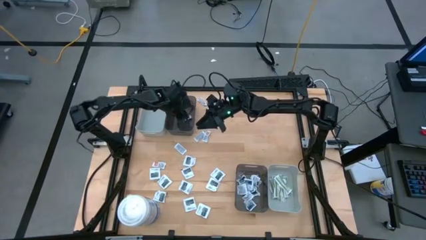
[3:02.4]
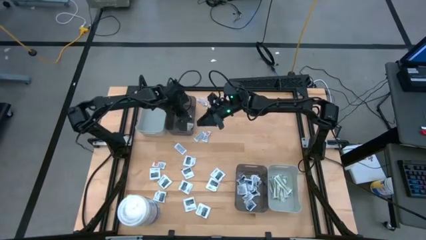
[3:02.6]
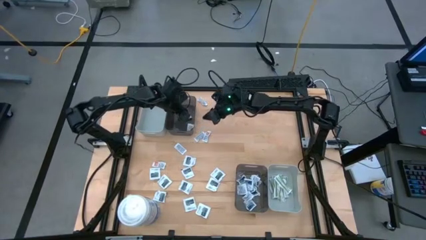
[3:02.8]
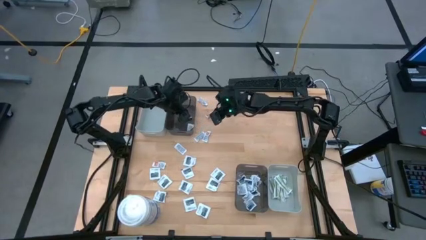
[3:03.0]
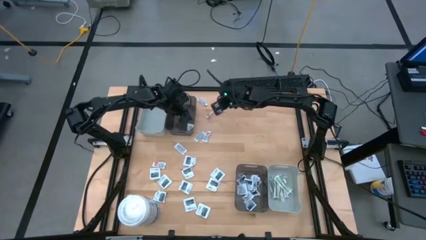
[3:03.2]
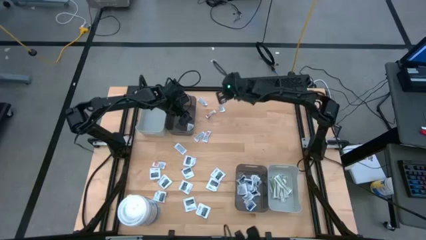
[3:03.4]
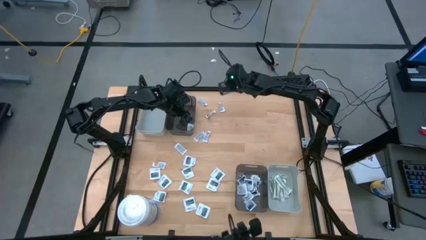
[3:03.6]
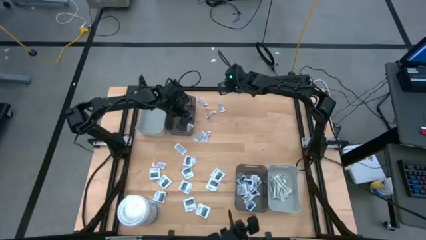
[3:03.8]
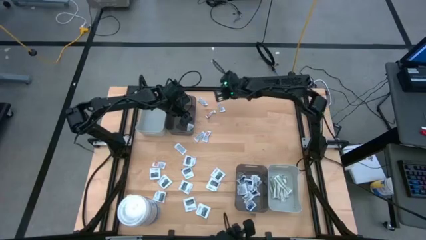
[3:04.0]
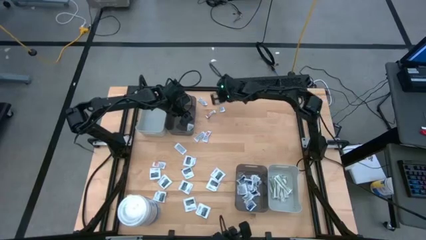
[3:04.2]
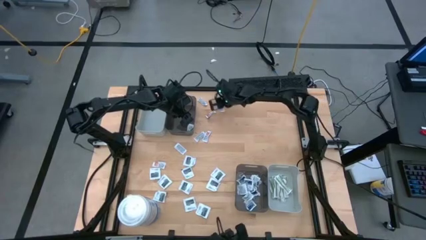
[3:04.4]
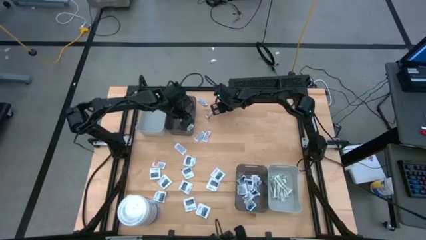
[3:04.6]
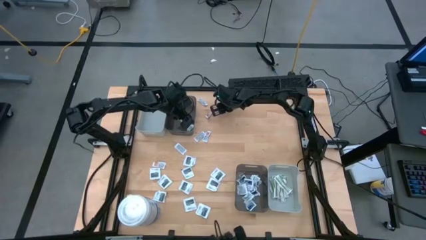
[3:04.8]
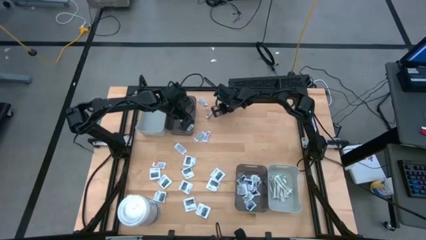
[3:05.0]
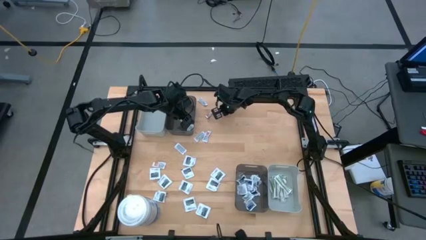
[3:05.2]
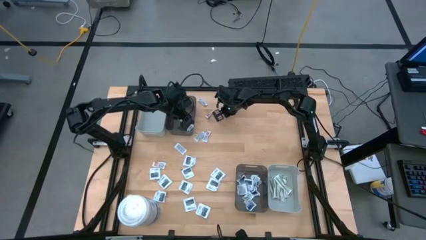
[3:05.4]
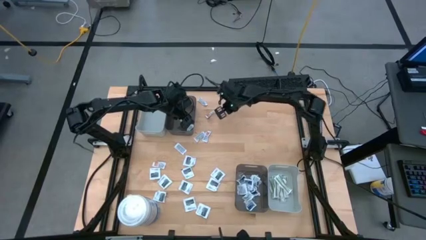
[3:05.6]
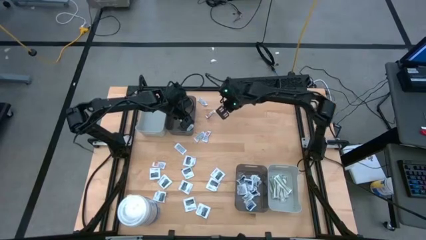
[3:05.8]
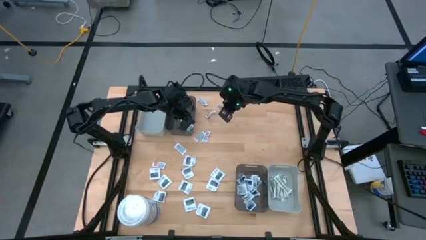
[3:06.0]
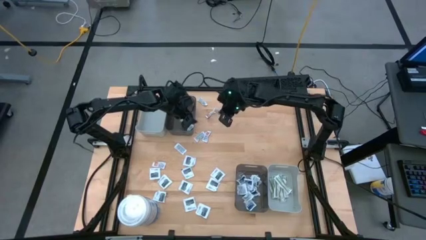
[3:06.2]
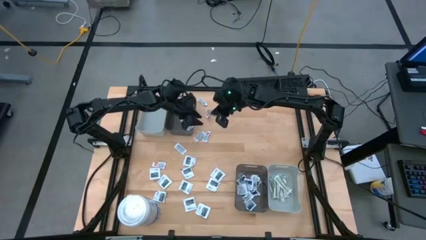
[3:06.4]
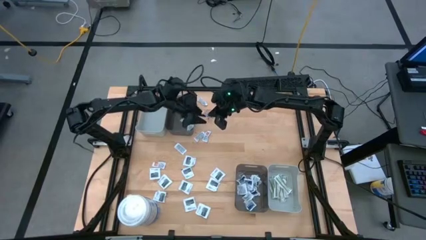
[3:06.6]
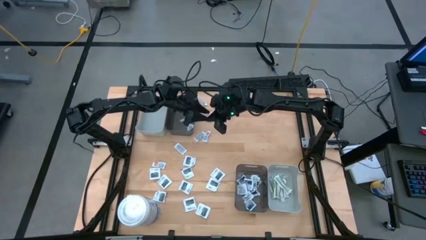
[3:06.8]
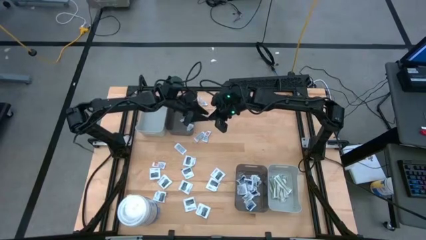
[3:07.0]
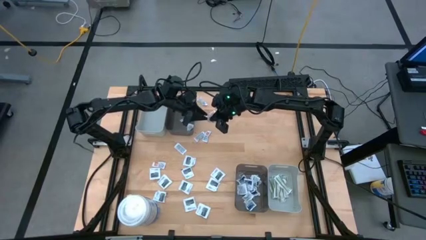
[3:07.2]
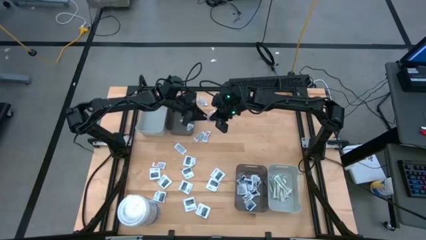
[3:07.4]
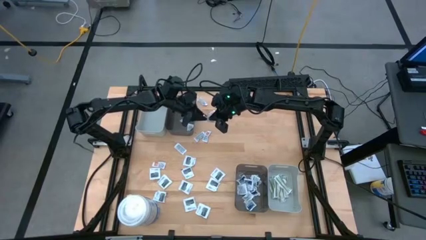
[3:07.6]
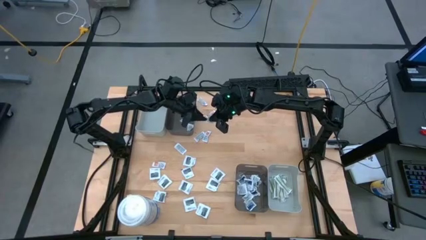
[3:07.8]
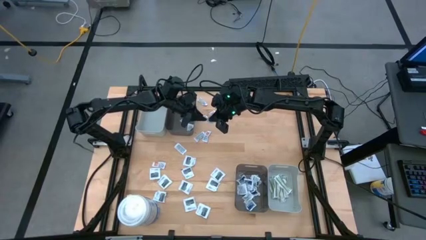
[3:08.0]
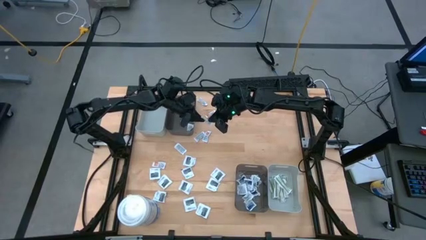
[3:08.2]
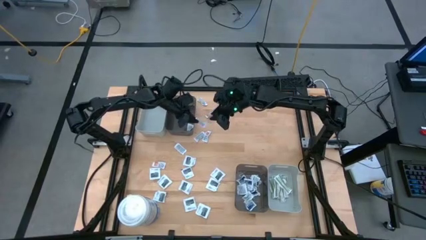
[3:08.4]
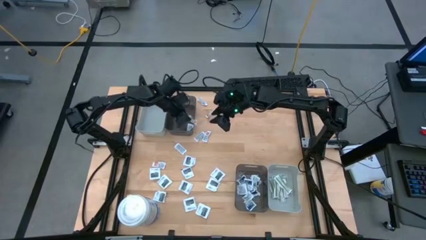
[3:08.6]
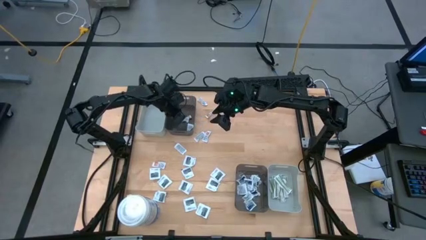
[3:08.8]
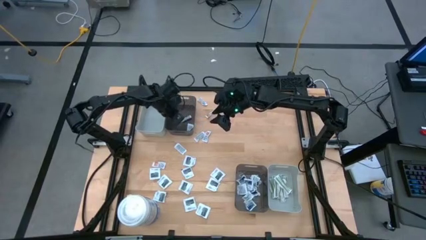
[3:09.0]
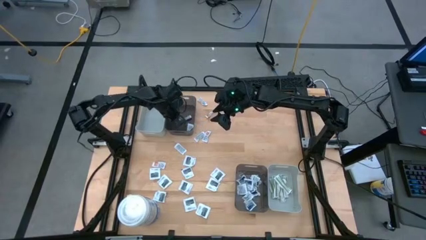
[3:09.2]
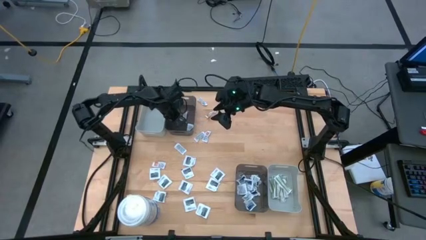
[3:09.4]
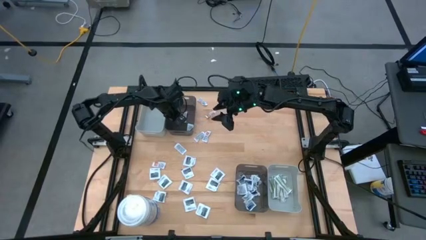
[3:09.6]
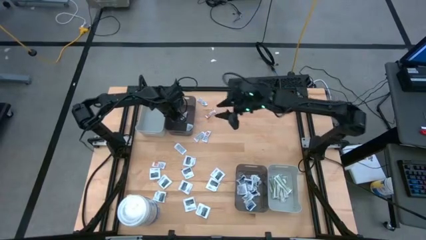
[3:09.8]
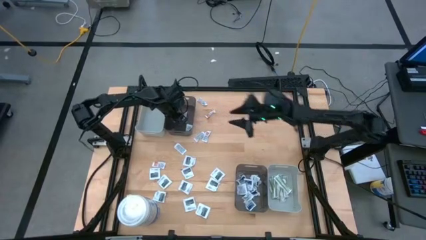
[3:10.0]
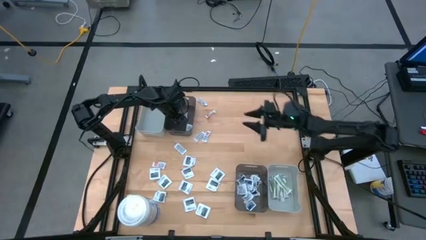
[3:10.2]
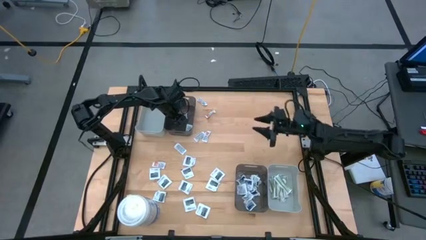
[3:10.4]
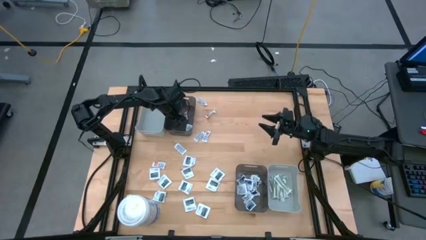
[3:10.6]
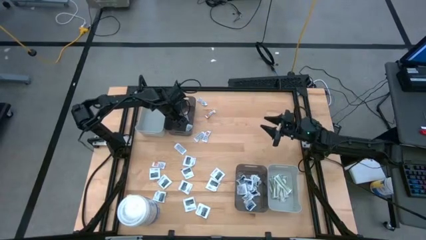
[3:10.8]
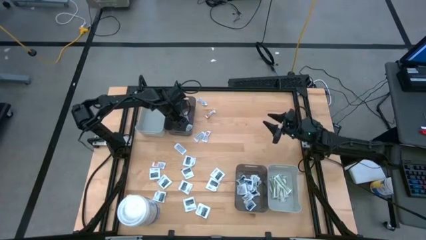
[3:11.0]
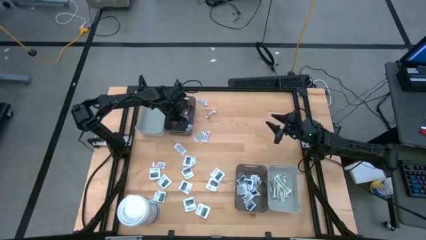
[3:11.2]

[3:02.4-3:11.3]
Task: Pick & Place First Aid Supplies
Put the white ointment pack into the top black bin

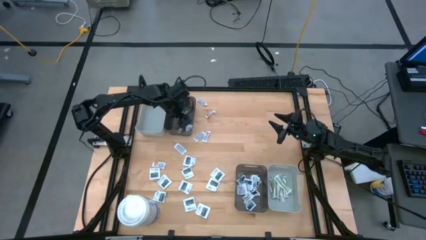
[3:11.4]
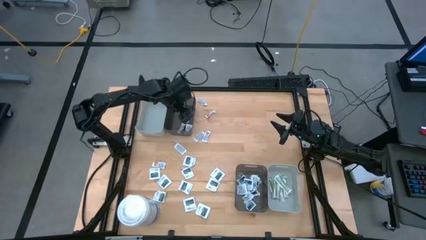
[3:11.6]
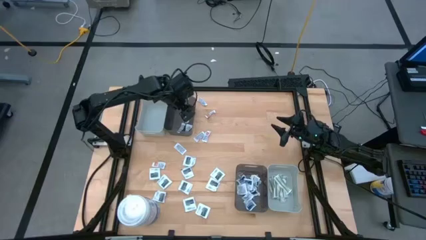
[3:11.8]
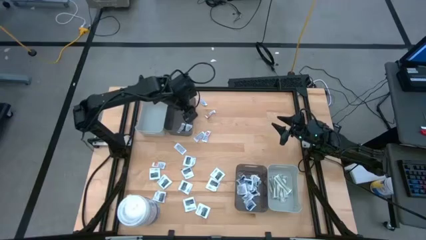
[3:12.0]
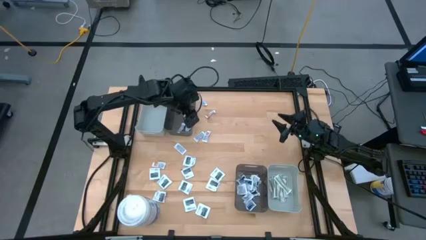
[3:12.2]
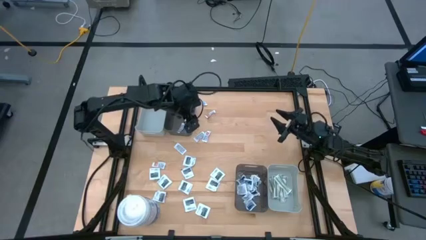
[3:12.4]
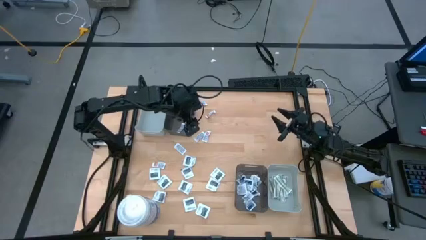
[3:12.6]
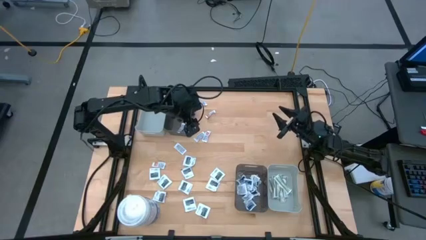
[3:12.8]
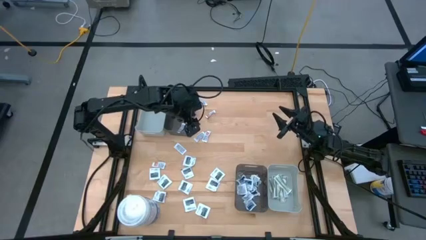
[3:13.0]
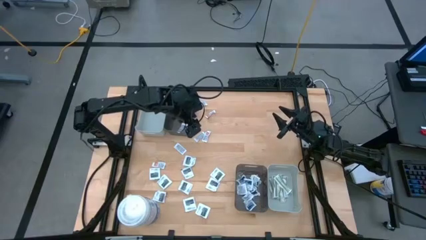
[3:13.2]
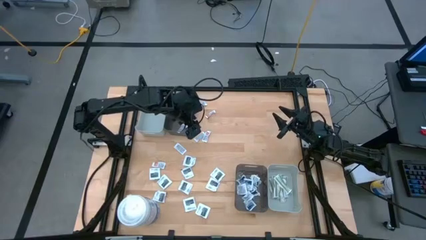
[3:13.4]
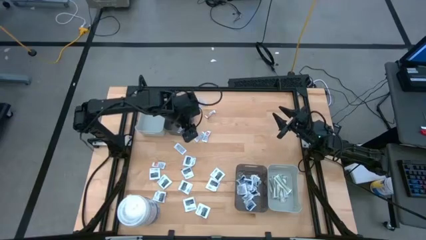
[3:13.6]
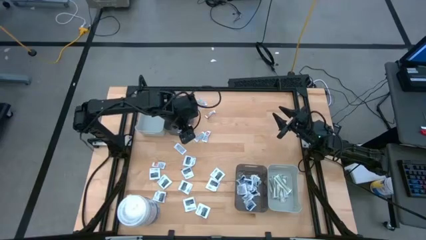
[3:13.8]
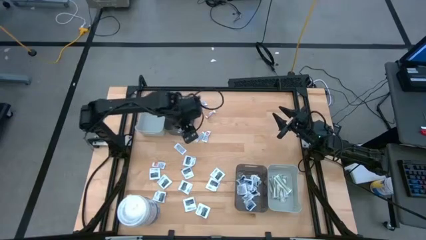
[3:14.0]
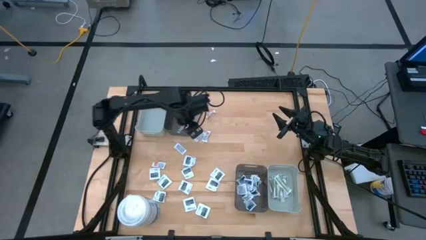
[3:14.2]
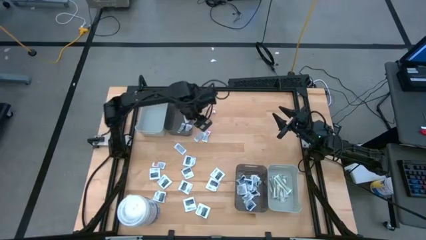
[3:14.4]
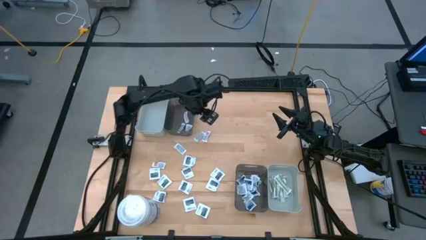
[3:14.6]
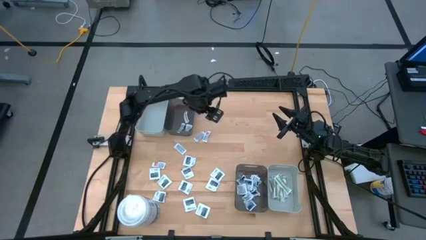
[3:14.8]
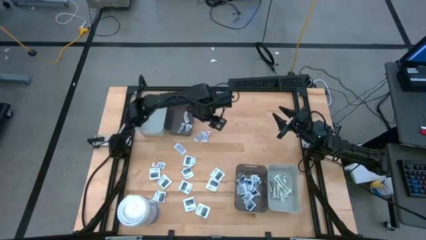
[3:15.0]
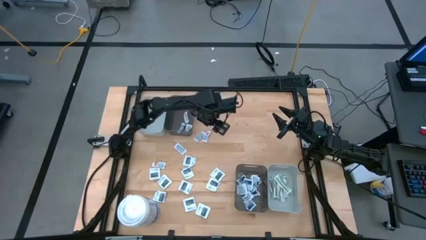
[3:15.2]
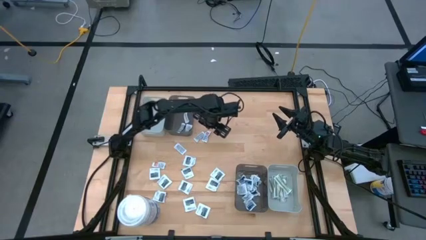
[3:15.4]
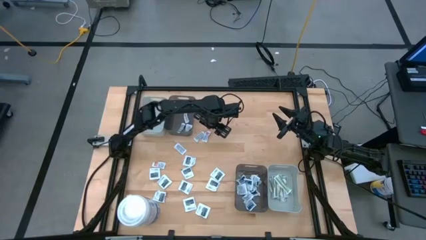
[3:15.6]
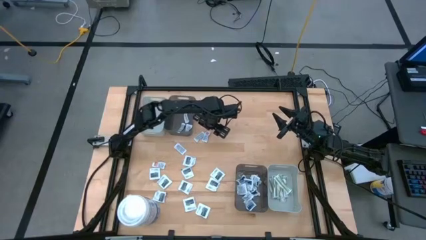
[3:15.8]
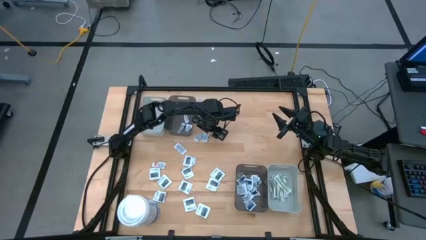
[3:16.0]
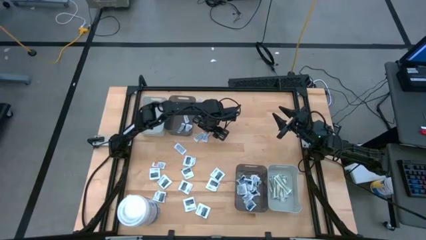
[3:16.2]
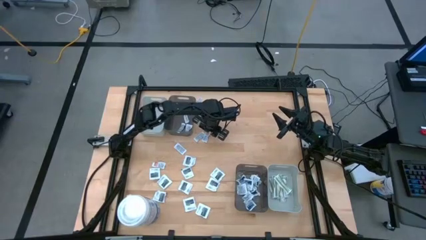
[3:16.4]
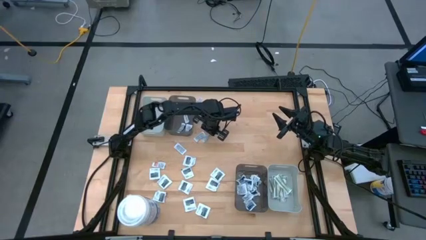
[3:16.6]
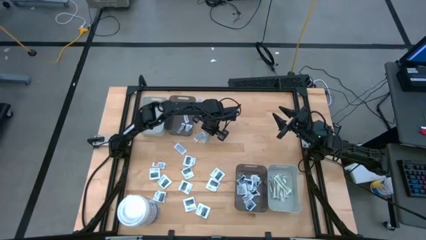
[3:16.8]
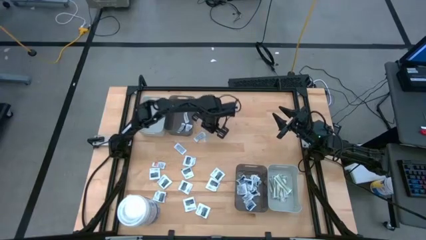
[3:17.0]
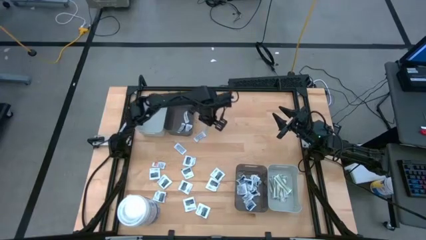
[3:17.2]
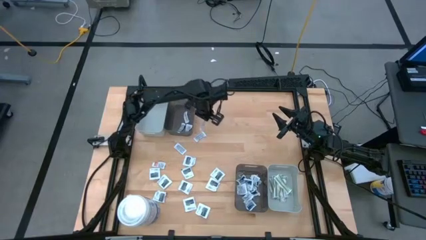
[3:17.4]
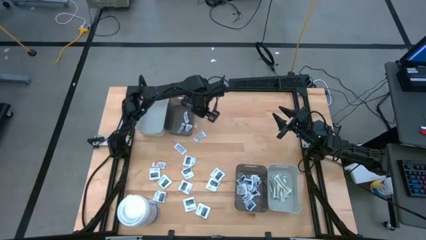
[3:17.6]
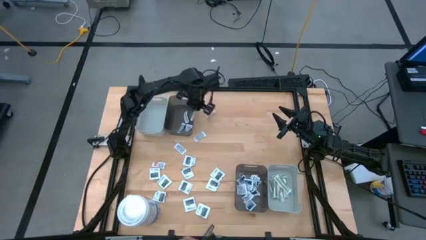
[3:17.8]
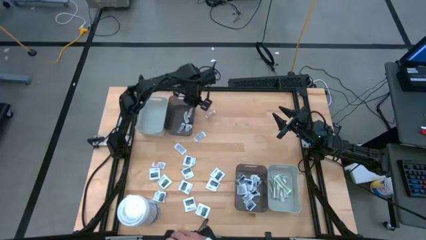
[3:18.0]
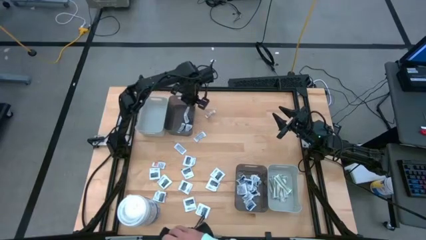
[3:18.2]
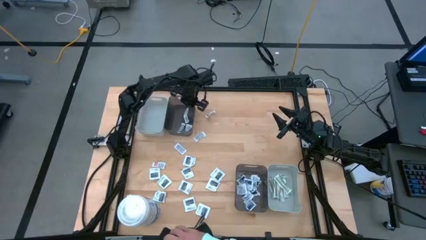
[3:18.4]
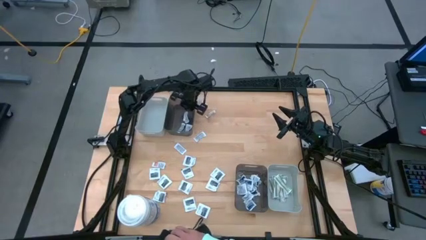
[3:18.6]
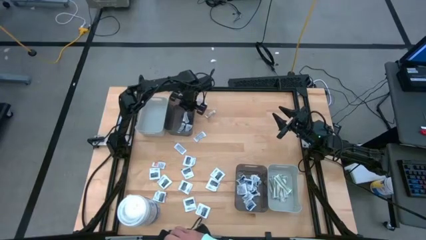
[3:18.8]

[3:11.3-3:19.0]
Put the white ointment pack into the top black bin
